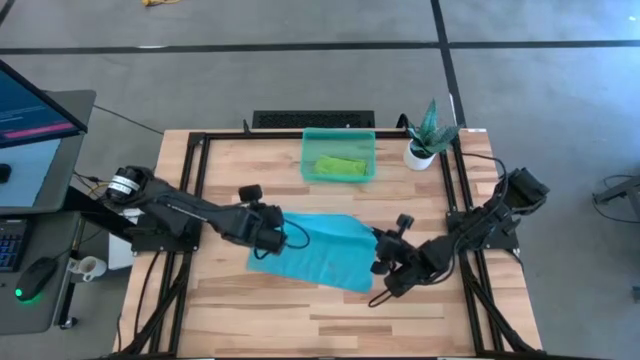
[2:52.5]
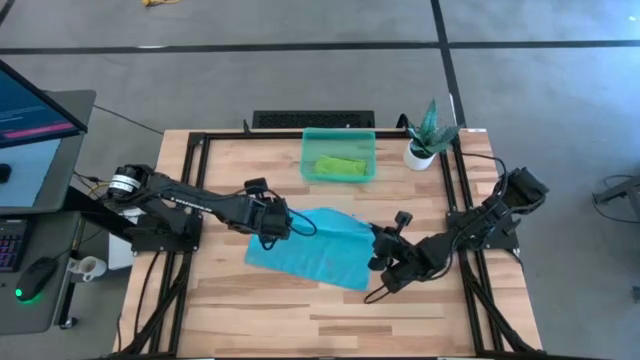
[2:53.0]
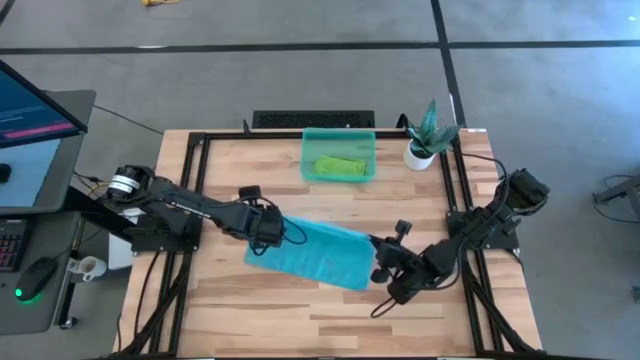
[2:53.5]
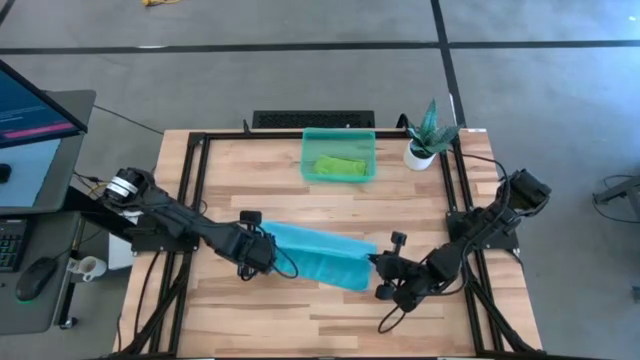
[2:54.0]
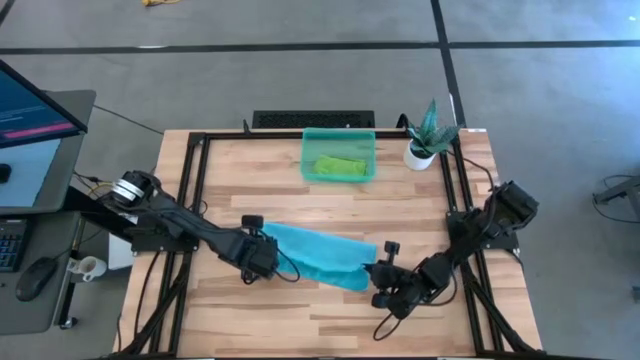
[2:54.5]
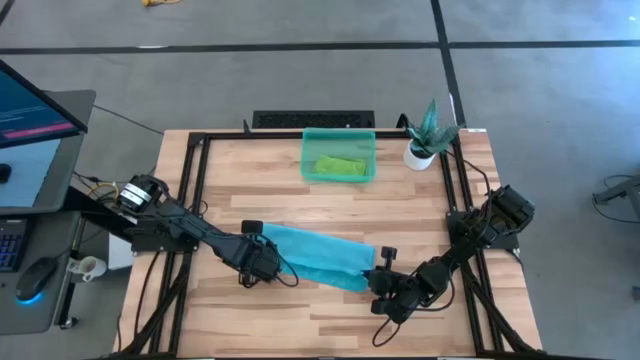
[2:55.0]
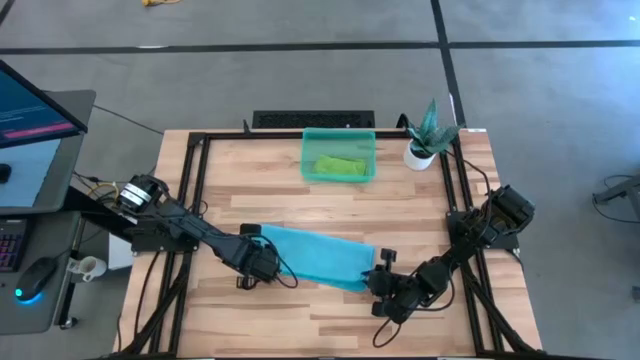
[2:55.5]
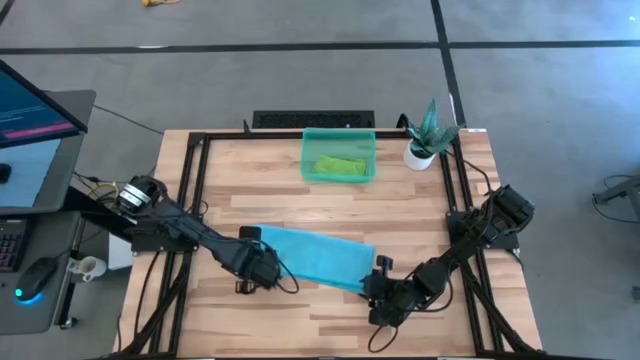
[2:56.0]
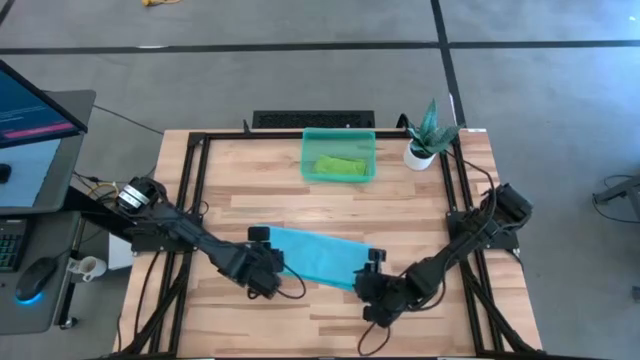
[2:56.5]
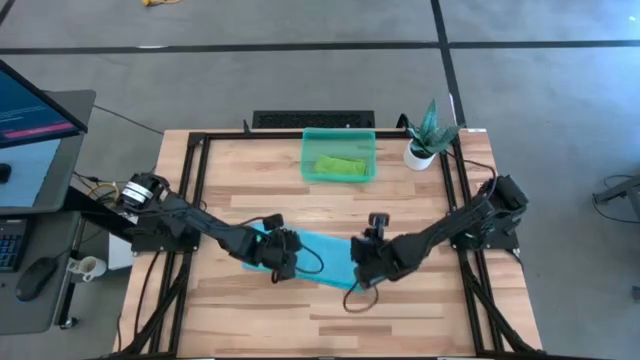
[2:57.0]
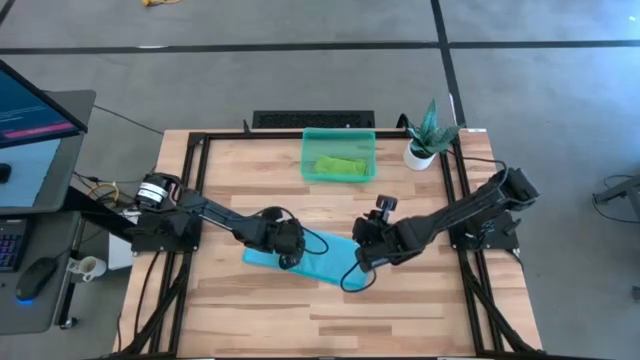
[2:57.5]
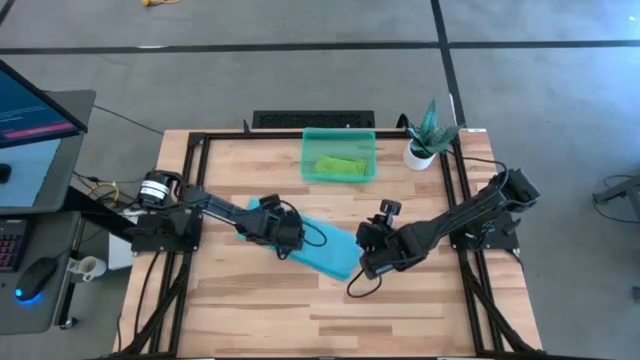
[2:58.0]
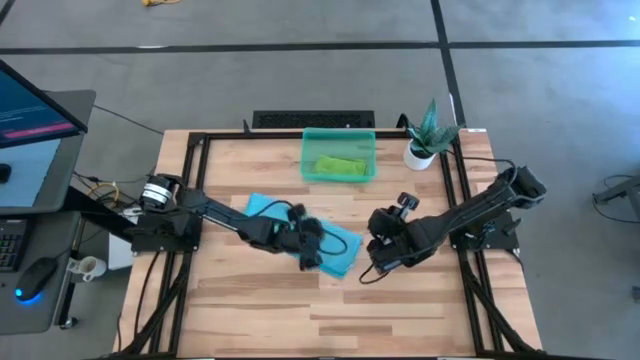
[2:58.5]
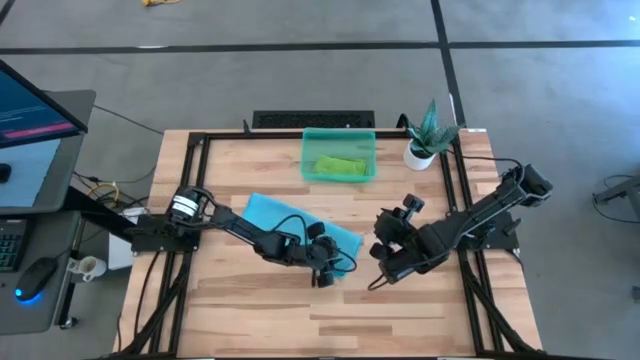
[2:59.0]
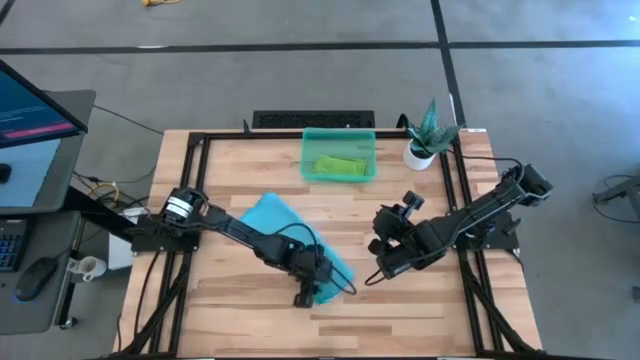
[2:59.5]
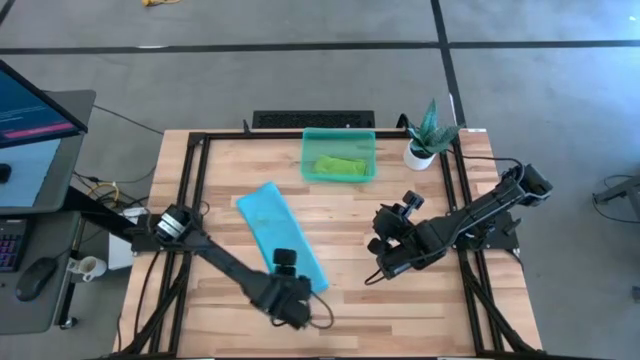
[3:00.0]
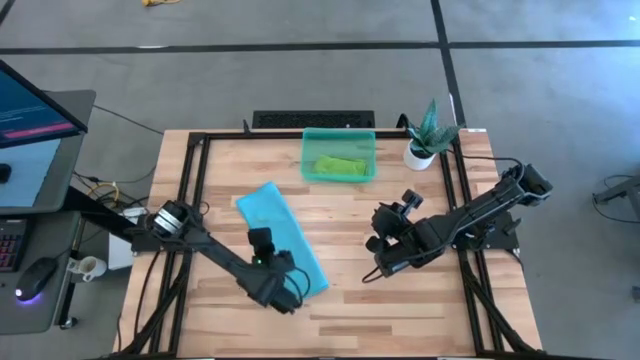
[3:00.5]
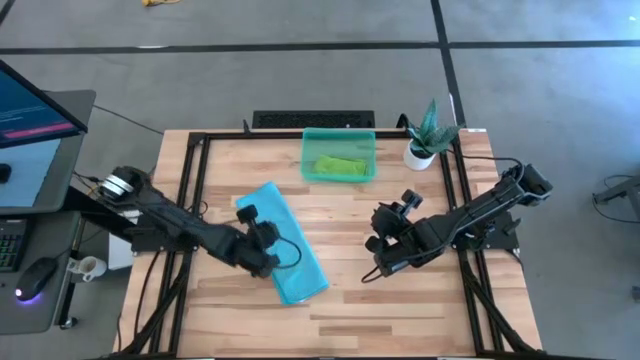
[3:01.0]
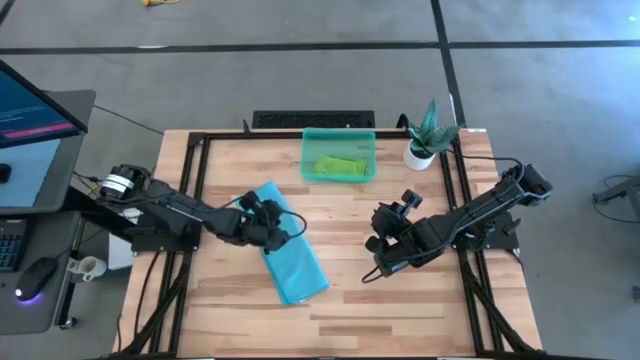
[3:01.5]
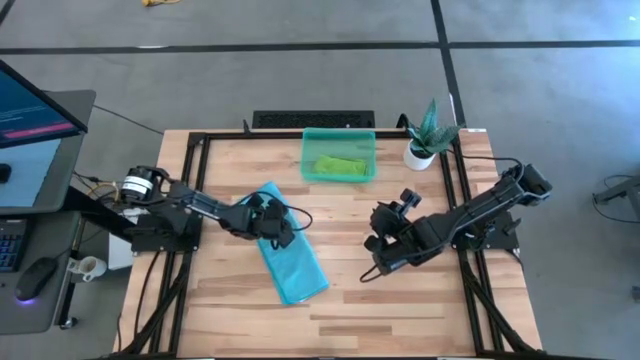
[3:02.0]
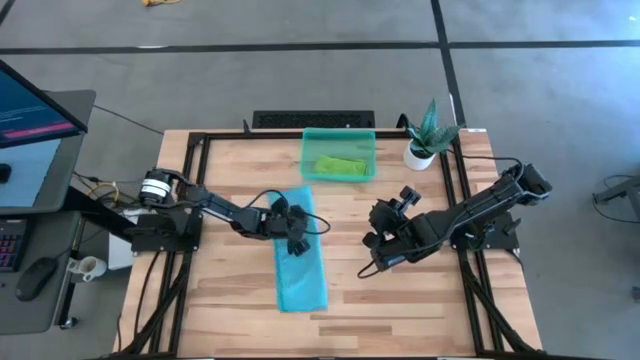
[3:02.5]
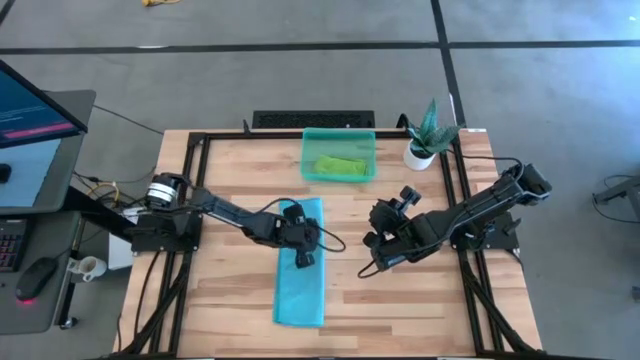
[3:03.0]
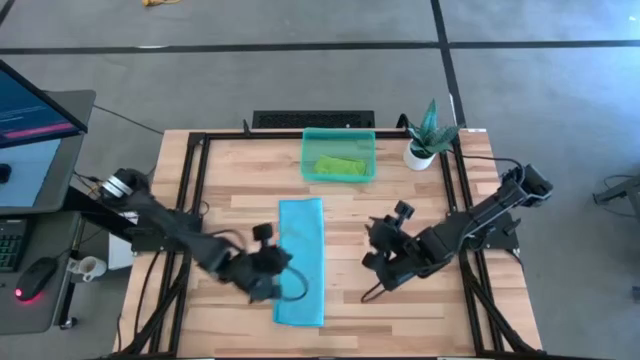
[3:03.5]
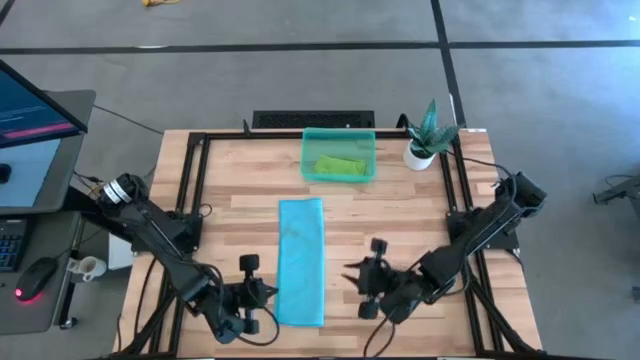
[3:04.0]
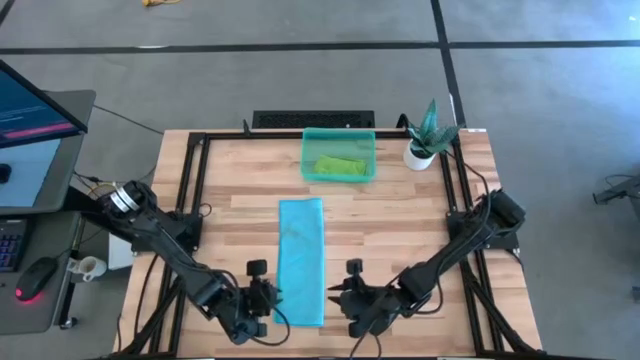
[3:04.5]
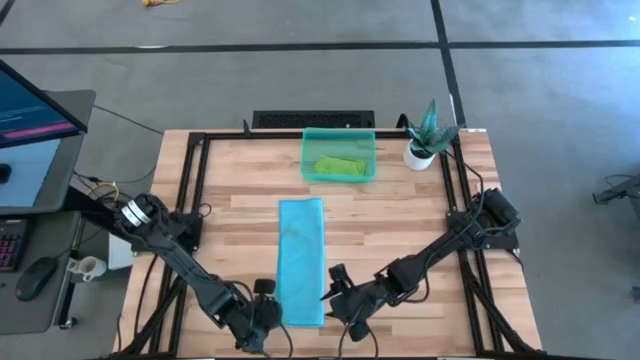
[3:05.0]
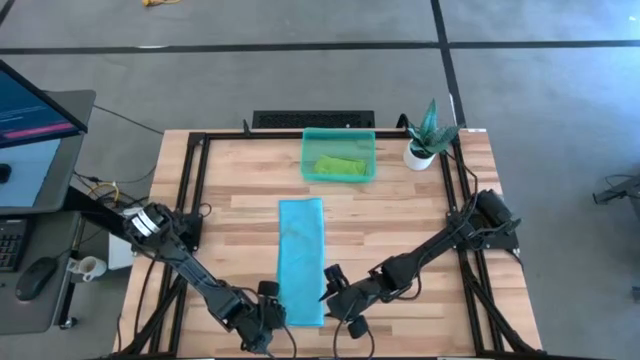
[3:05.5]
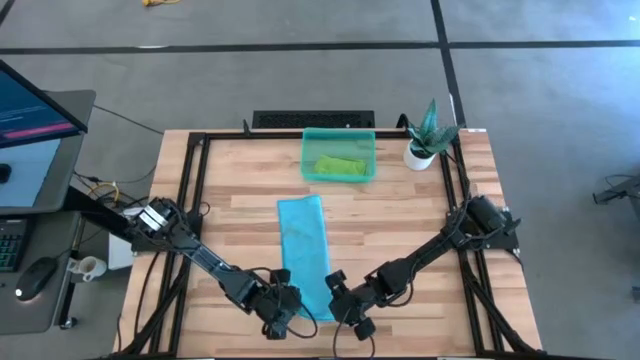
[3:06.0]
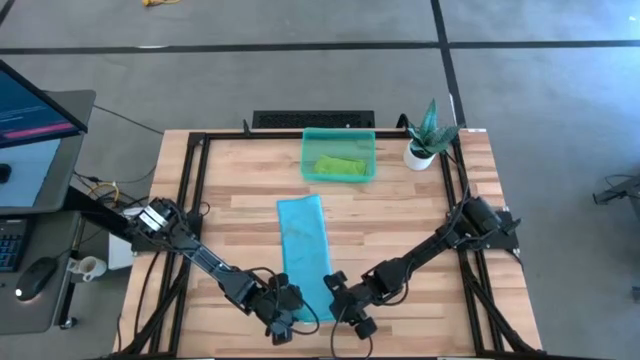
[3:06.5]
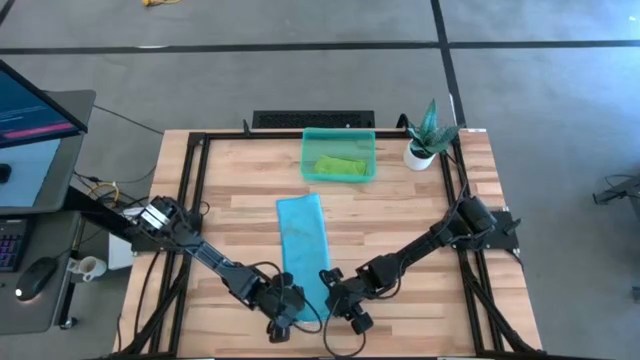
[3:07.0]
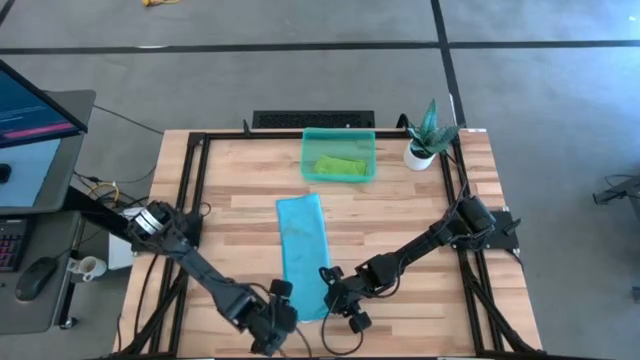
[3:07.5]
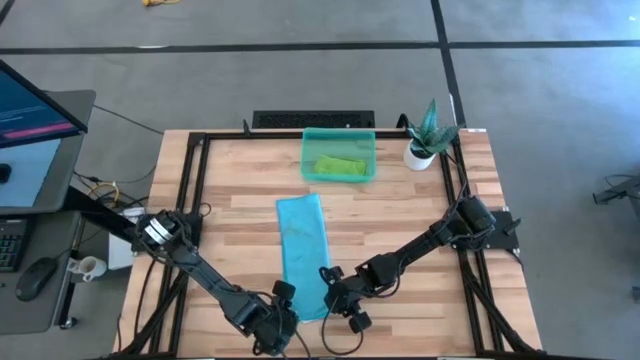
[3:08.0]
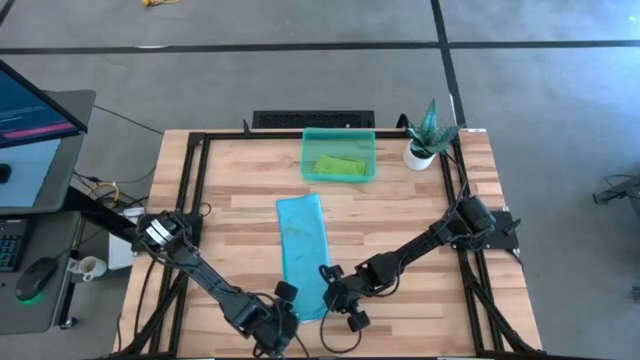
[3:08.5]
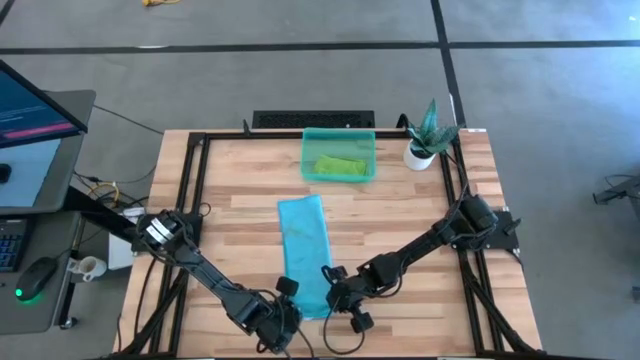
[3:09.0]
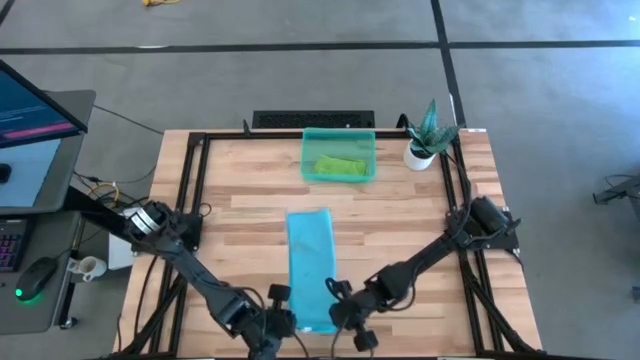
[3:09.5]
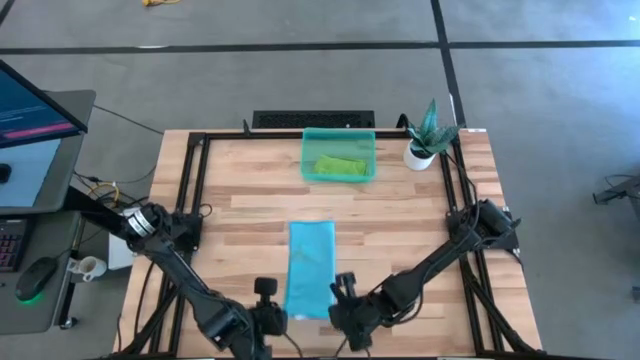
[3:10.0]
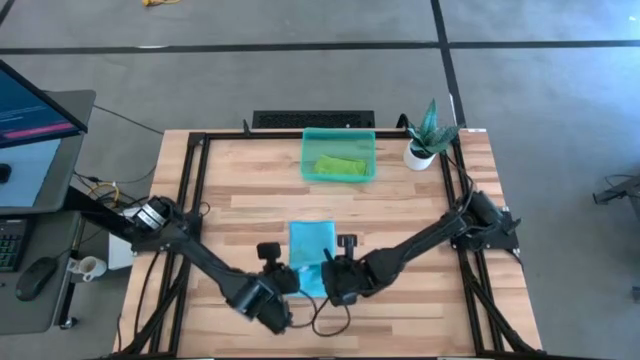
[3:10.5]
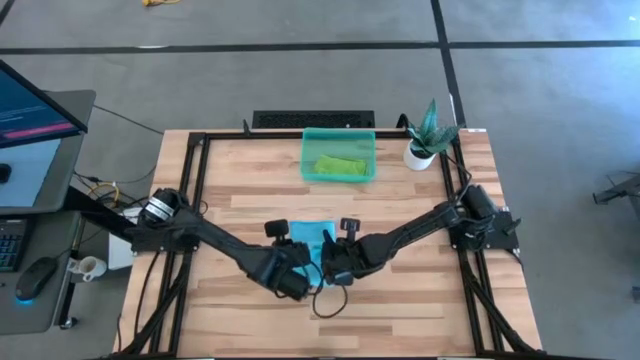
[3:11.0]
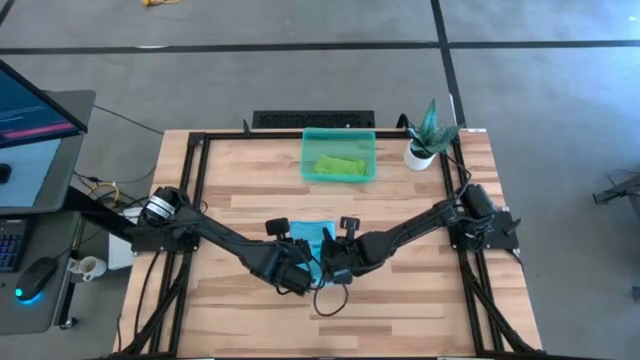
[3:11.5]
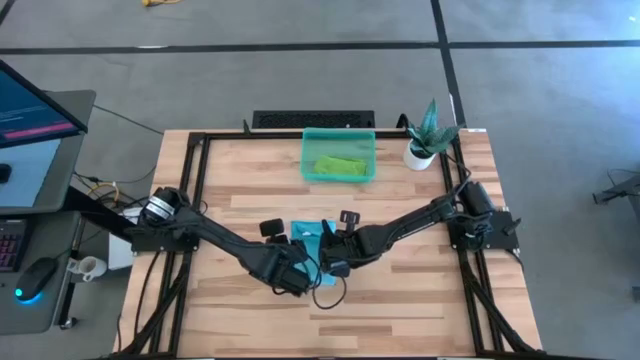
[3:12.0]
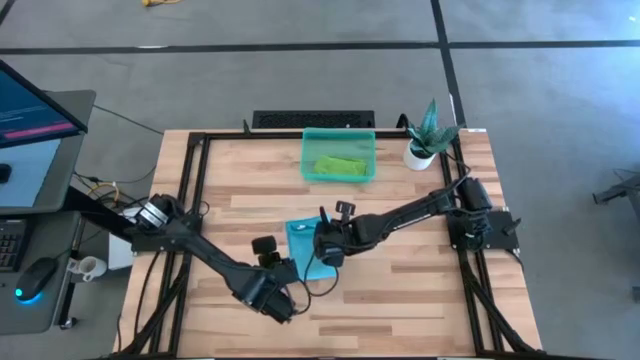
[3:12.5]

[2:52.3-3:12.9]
Task: Roll microfiber towels into tight, uniform cylinder then place into a basket
Fold the blue microfiber cloth

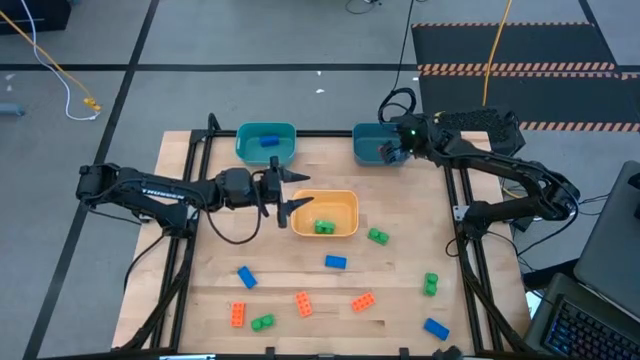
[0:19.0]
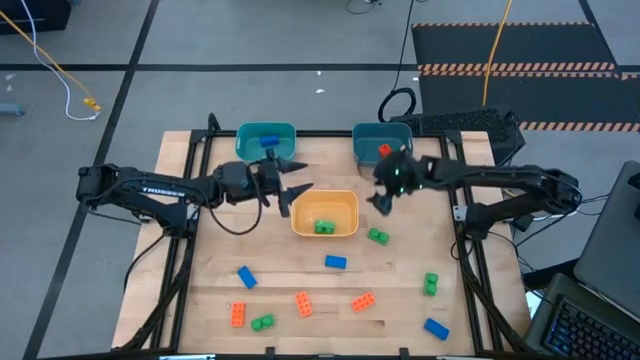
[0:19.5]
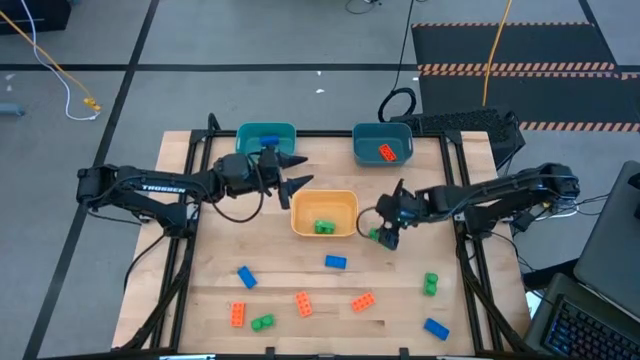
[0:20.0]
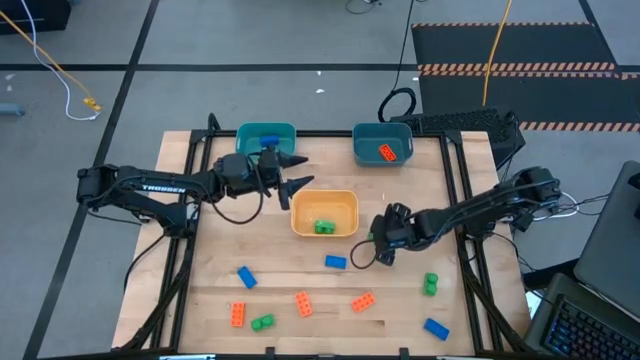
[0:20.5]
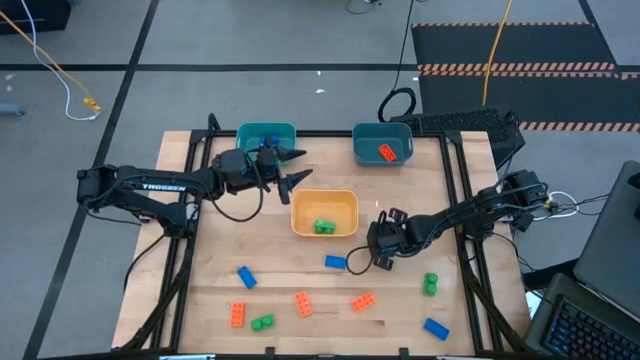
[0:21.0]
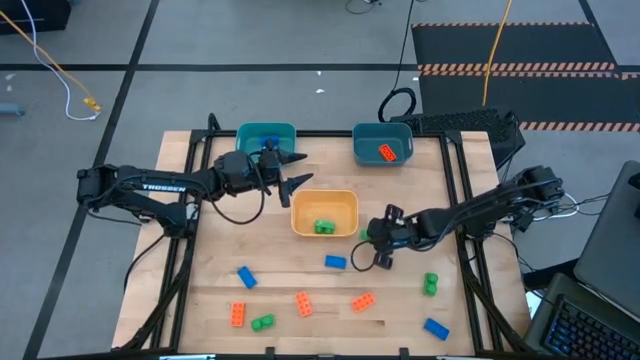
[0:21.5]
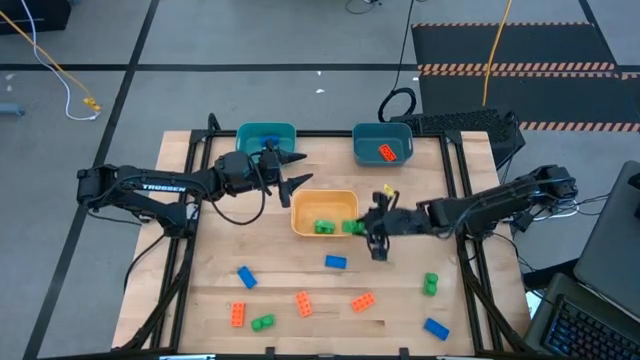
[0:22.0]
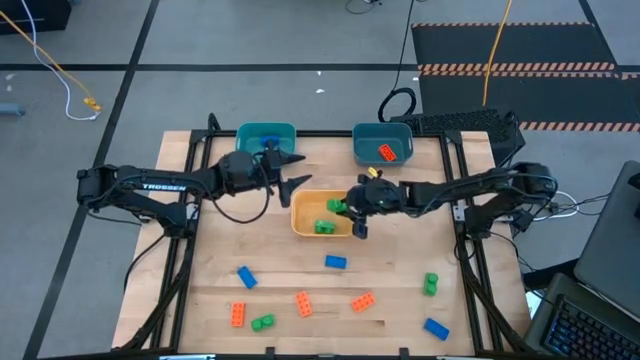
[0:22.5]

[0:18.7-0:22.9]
Task: Sort & place blocks by color
Put the green game piece into the yellow bin
